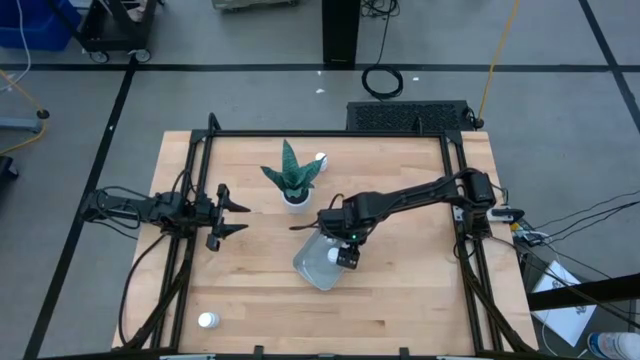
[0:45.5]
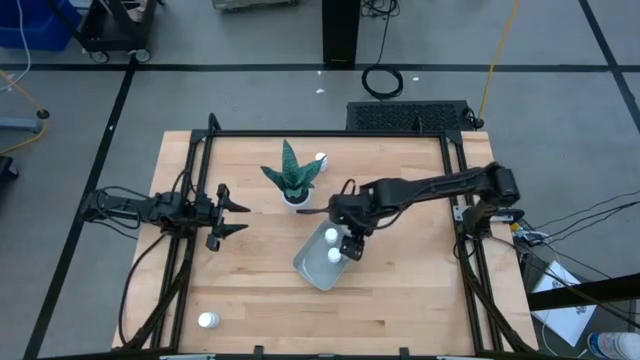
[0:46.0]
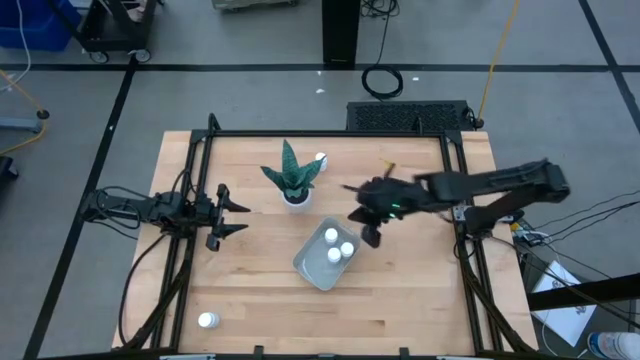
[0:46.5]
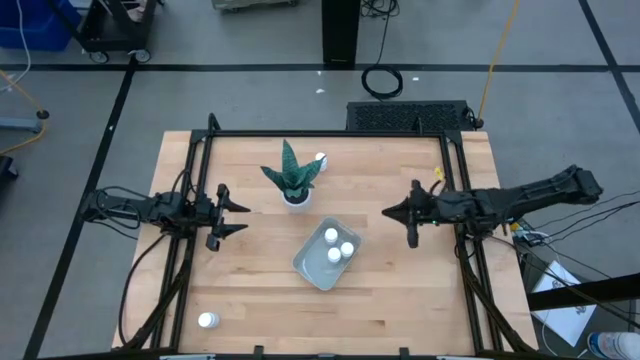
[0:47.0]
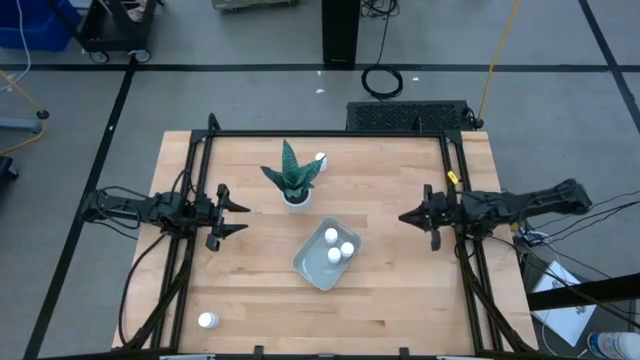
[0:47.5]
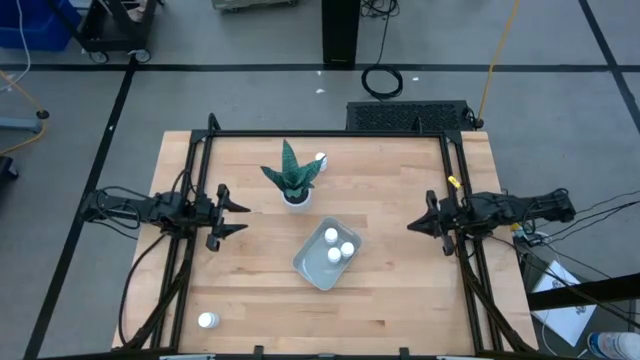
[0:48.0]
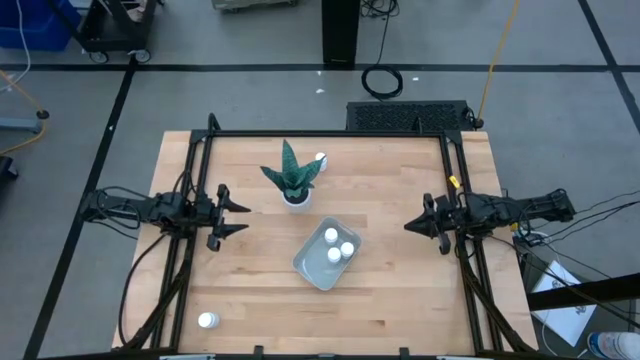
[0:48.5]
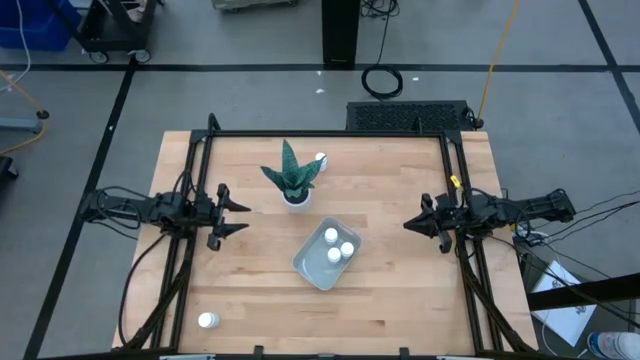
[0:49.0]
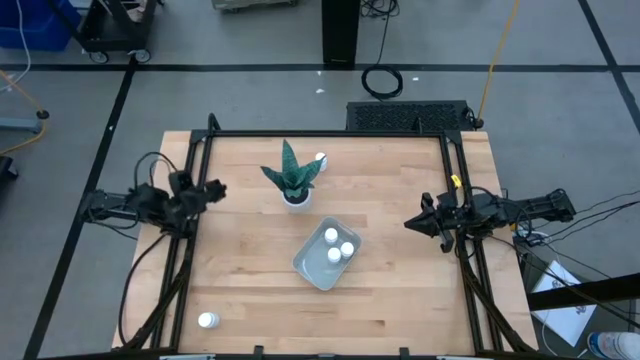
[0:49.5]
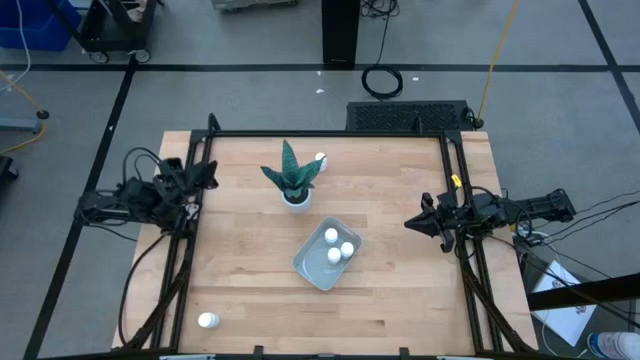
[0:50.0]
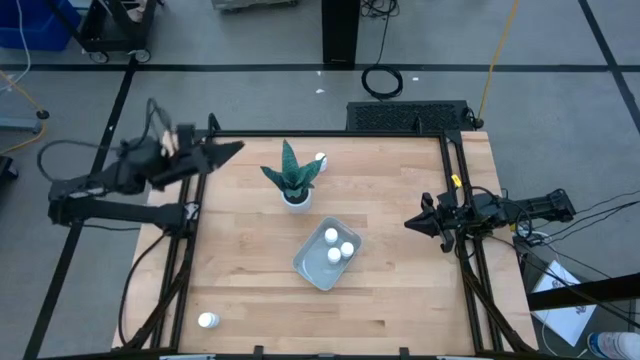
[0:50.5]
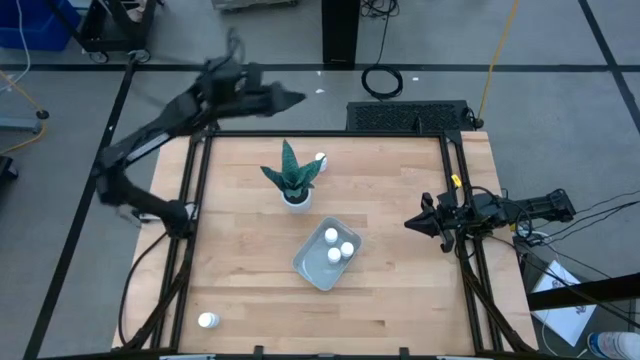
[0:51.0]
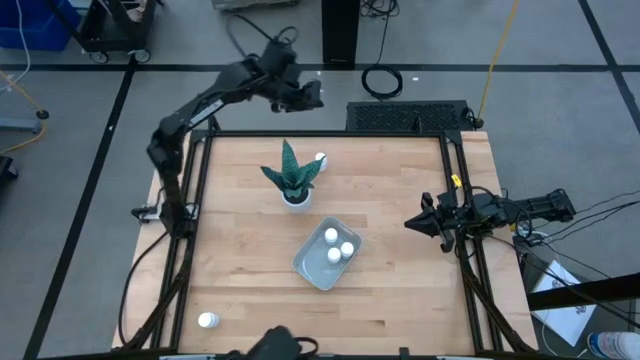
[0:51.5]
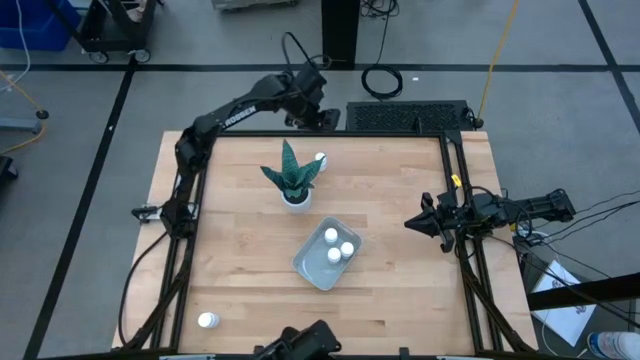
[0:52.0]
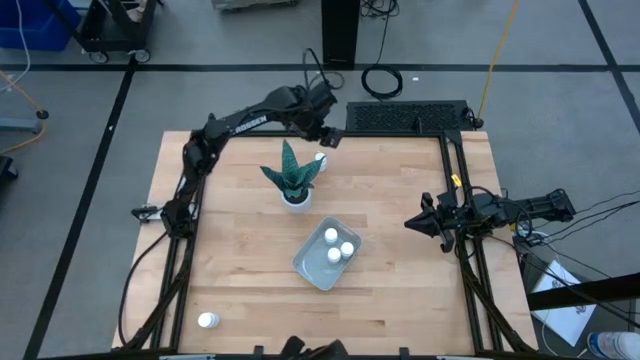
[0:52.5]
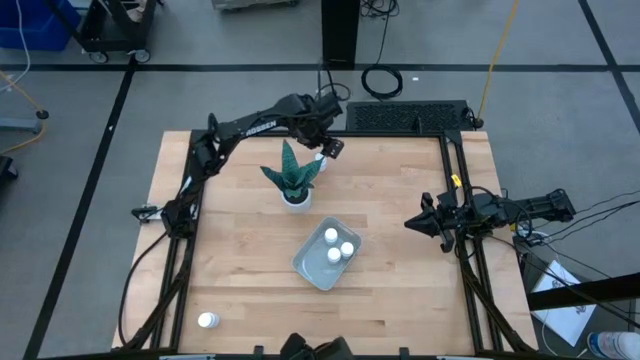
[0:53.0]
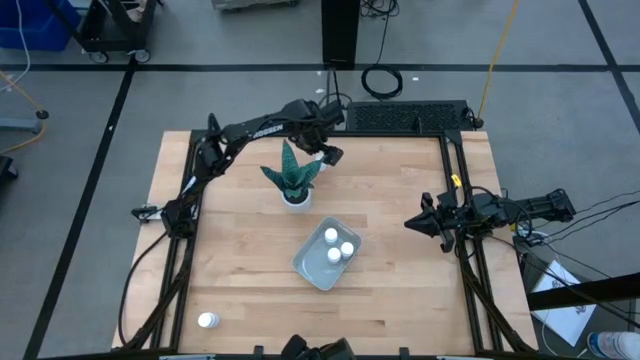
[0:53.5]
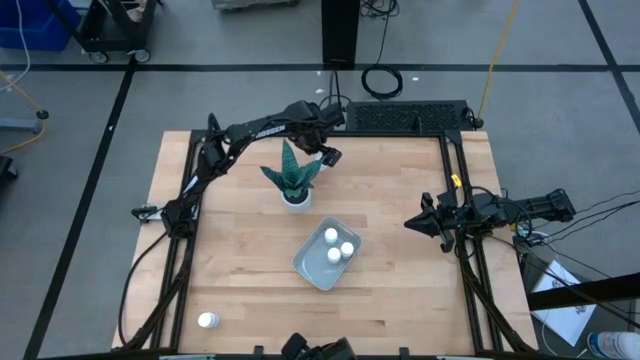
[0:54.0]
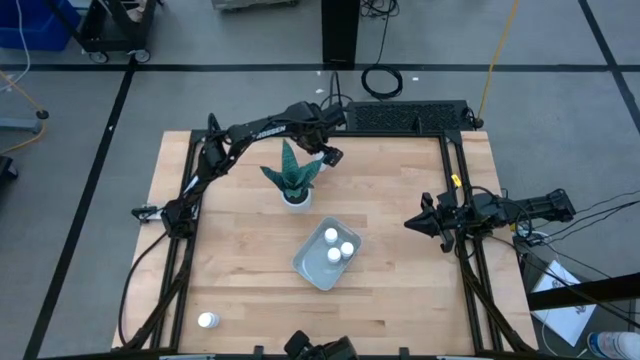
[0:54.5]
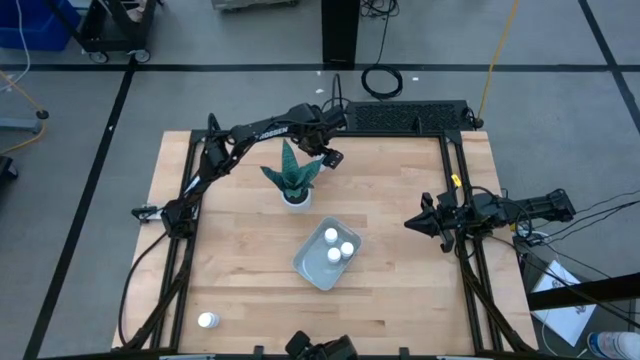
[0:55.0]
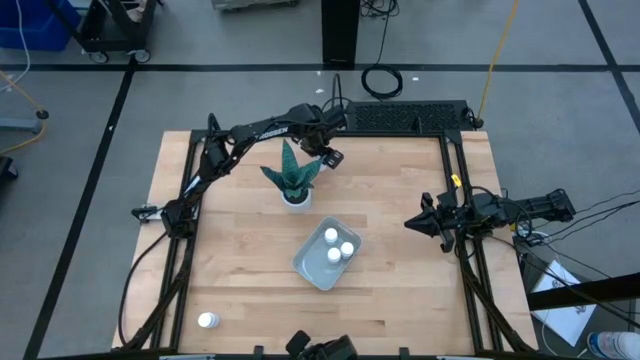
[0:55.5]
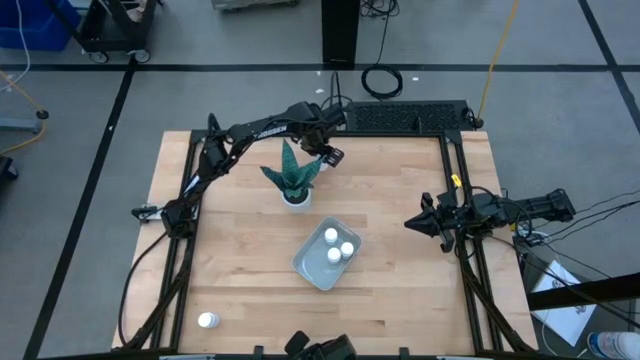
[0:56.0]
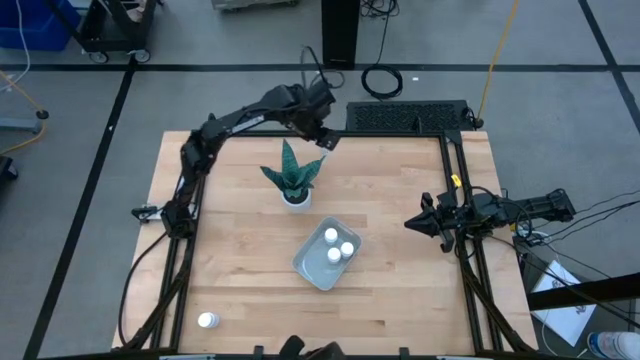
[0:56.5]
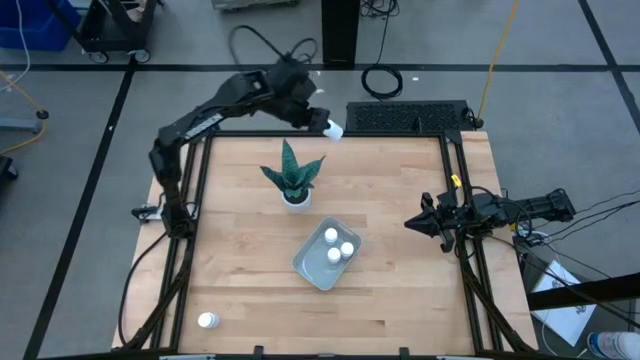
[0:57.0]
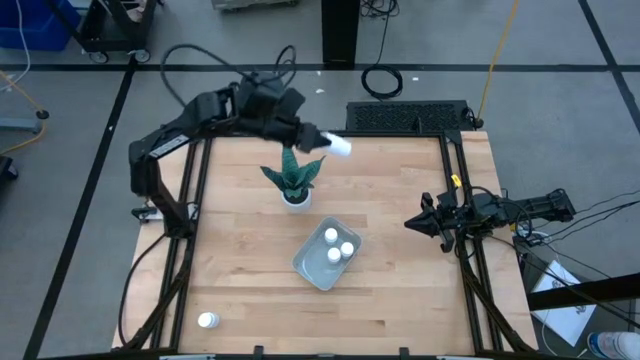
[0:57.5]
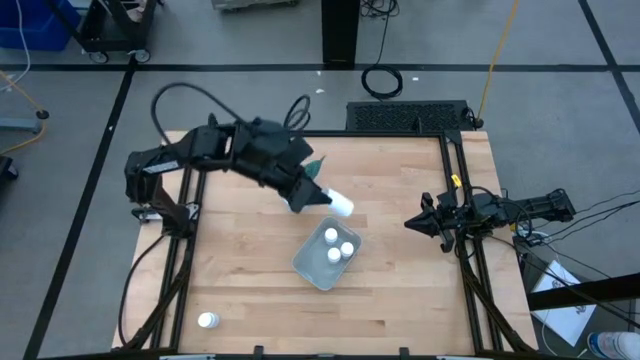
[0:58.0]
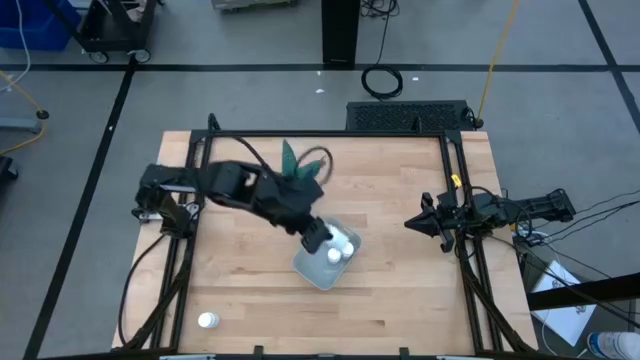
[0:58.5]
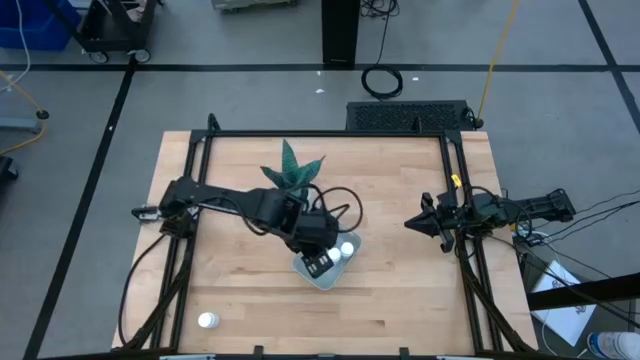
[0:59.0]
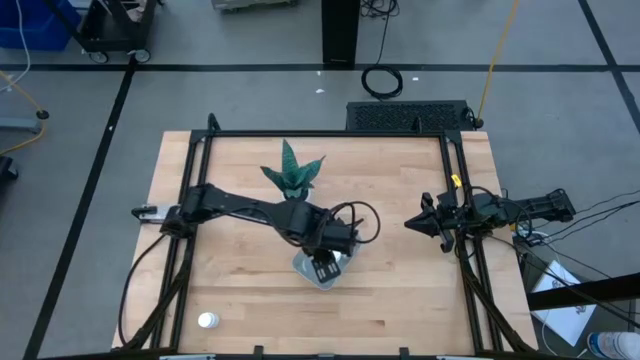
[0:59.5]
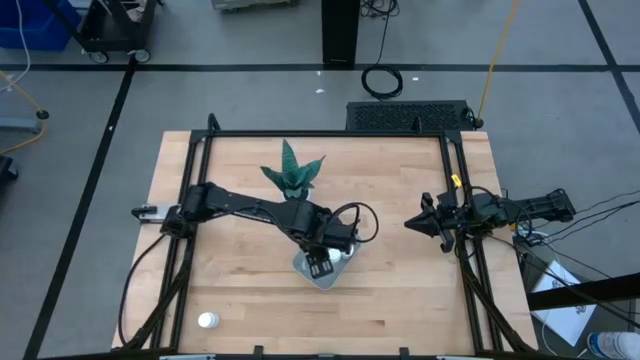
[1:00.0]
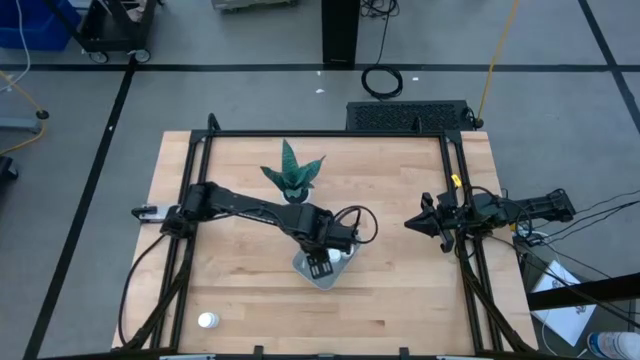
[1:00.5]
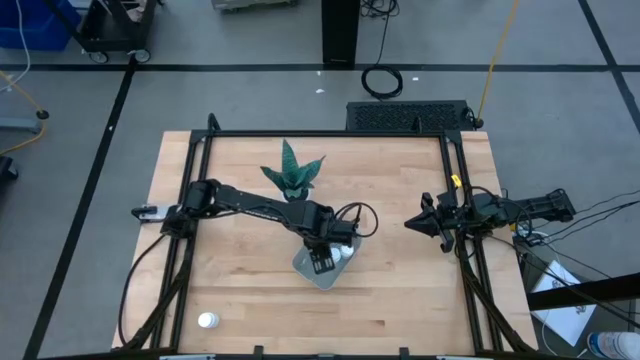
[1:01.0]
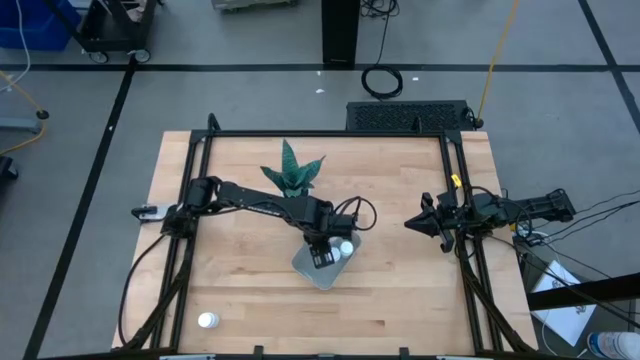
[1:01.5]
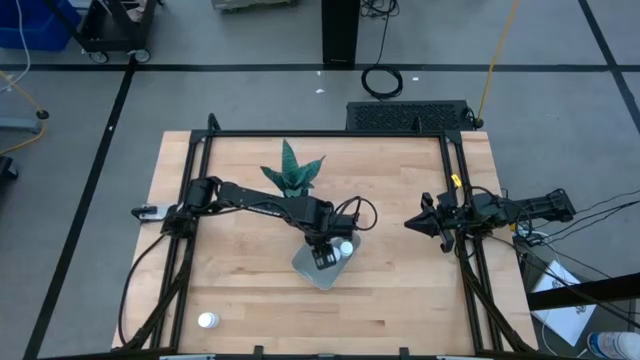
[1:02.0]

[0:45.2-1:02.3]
Task: Pick and place pill bottles into a basket
Put the white medicine bottle into the gray bin

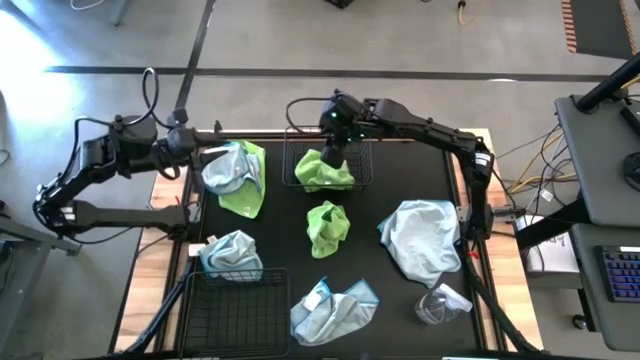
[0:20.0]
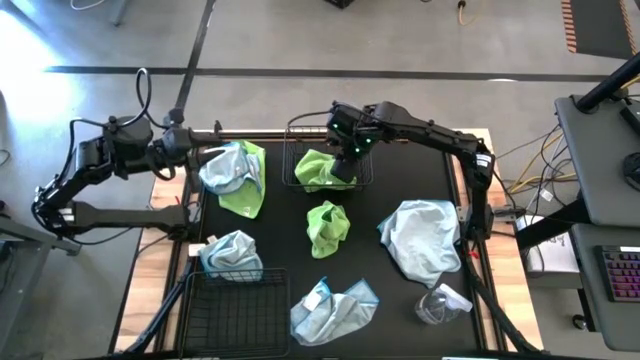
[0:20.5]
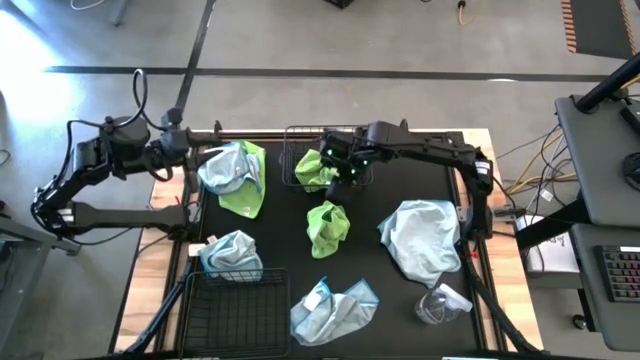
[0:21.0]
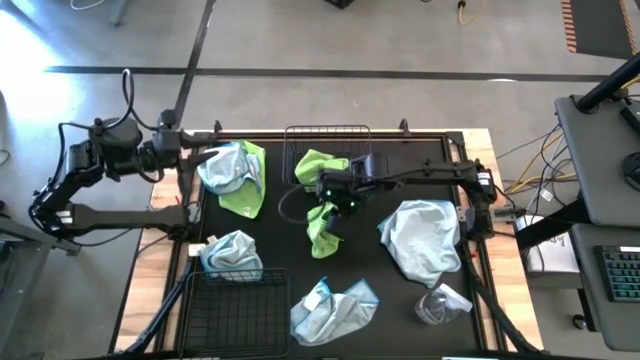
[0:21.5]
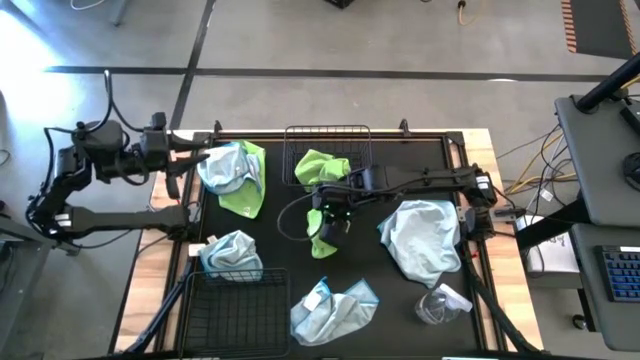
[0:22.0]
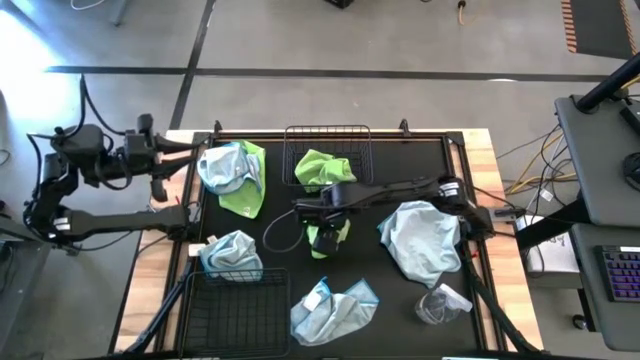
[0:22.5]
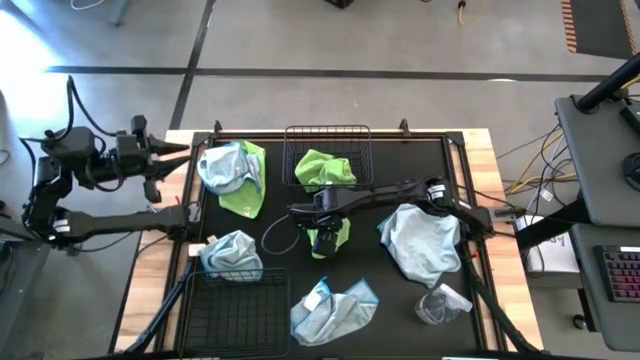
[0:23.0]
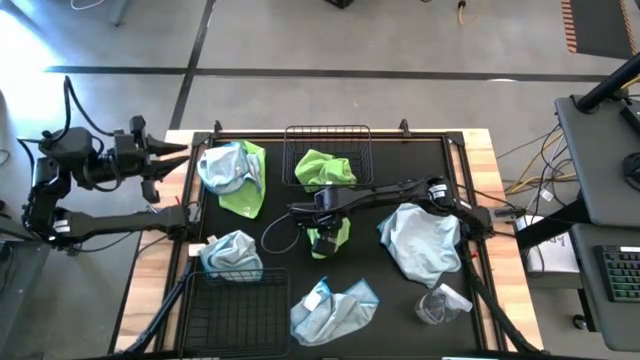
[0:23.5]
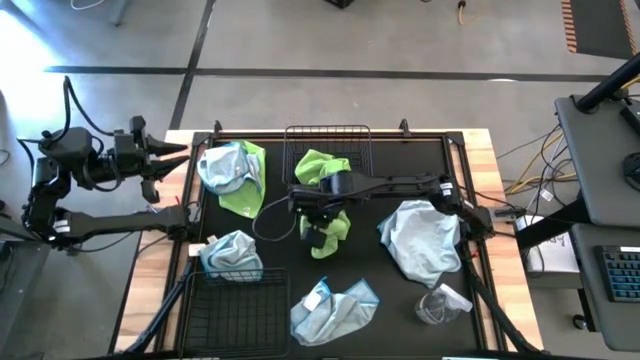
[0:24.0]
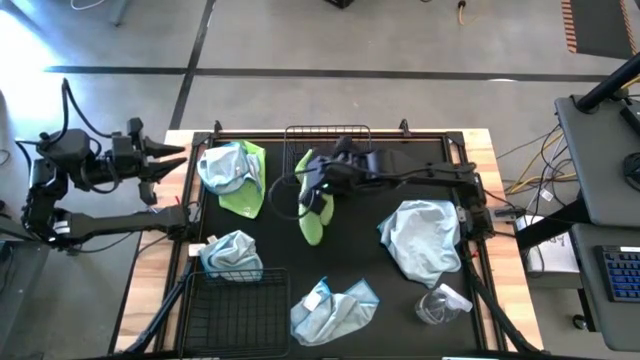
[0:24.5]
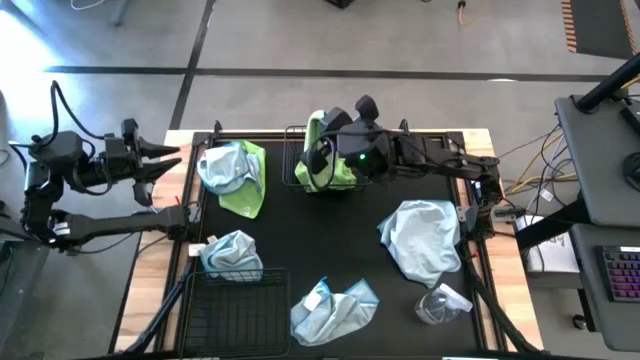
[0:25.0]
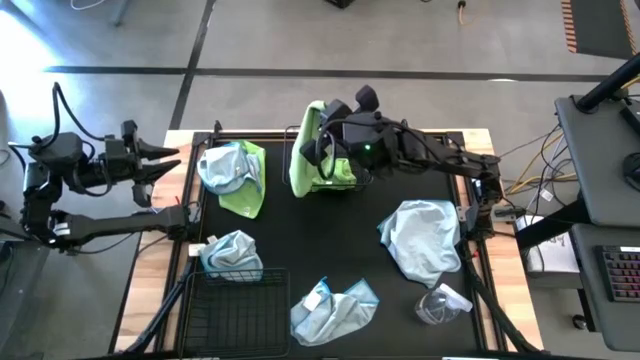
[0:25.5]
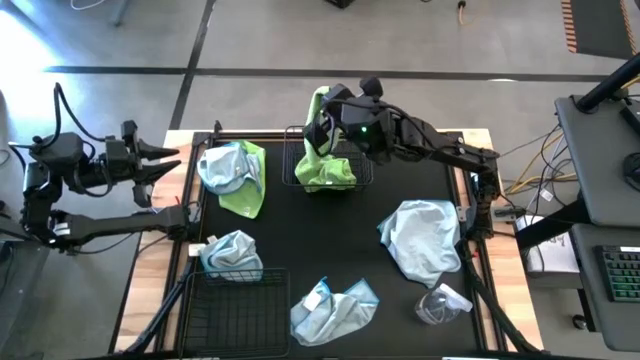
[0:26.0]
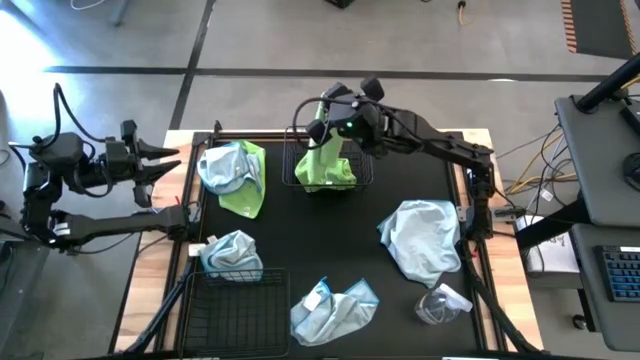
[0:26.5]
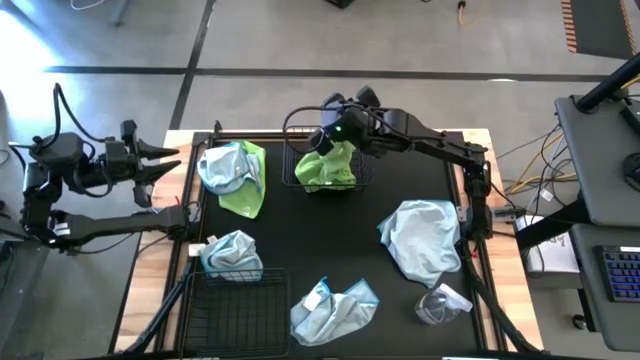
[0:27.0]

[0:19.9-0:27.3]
Task: Sort microfiber towel by color & place in baskets
Put the green microfiber towel into the top black wire basket
